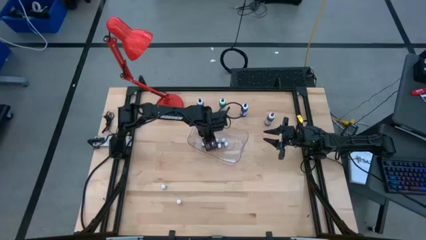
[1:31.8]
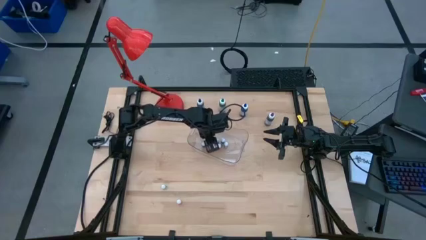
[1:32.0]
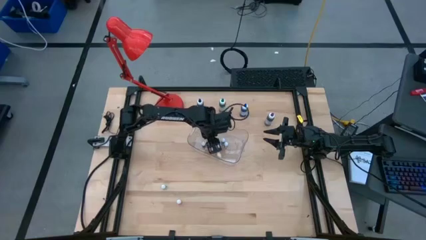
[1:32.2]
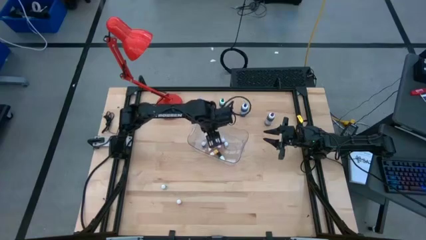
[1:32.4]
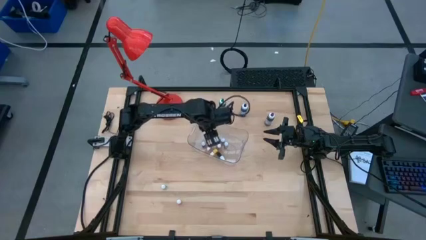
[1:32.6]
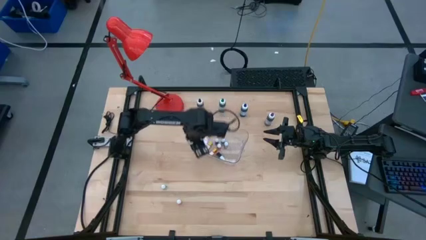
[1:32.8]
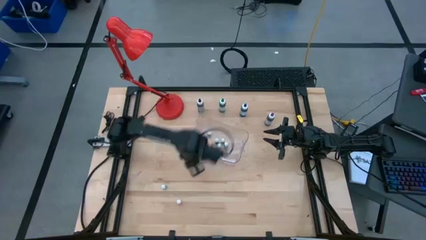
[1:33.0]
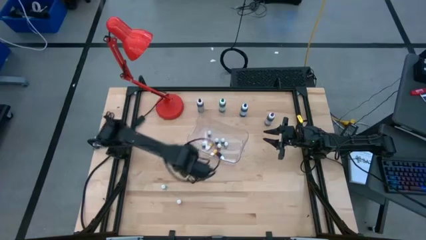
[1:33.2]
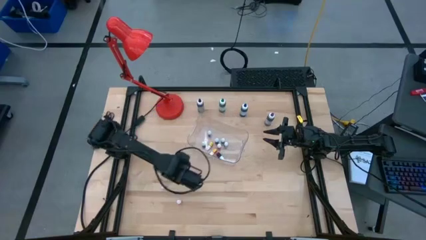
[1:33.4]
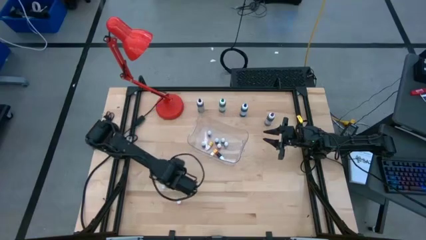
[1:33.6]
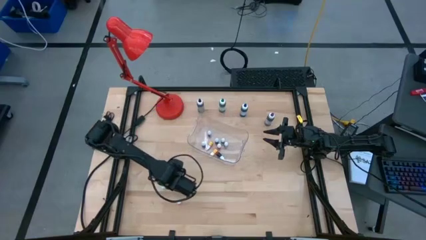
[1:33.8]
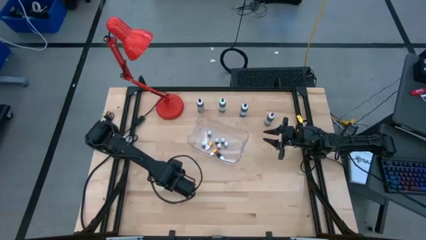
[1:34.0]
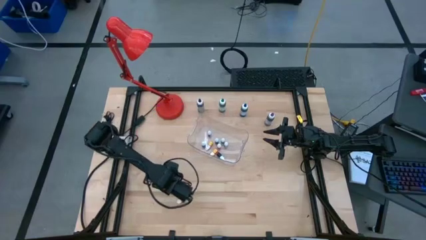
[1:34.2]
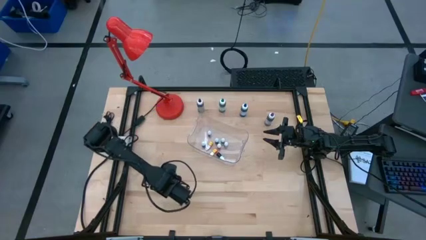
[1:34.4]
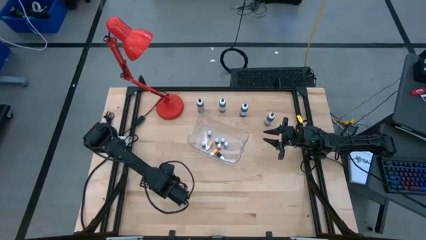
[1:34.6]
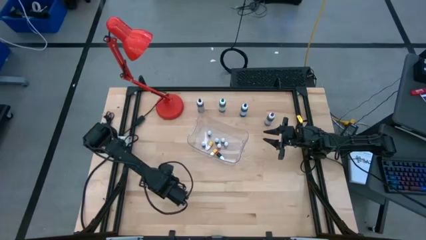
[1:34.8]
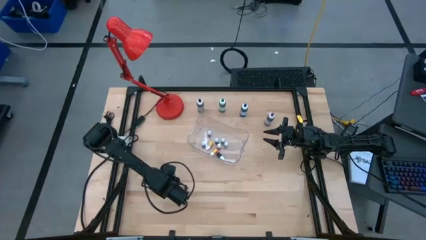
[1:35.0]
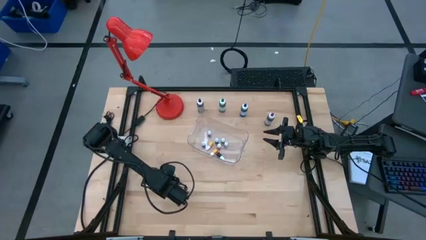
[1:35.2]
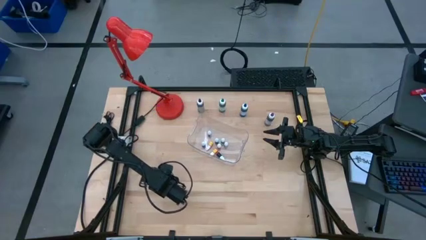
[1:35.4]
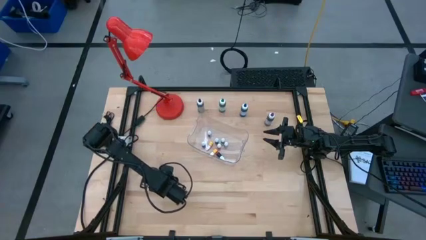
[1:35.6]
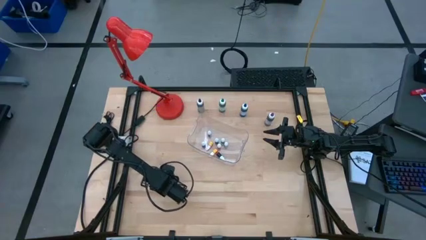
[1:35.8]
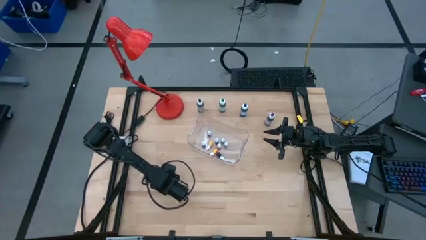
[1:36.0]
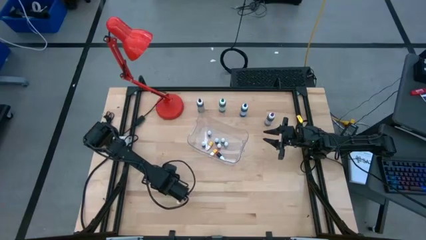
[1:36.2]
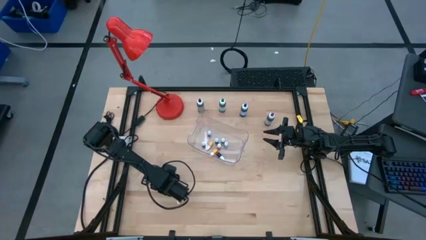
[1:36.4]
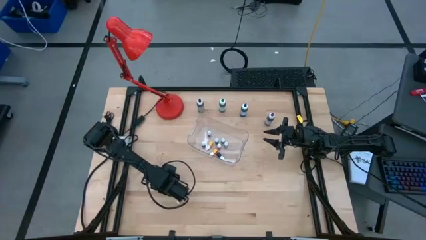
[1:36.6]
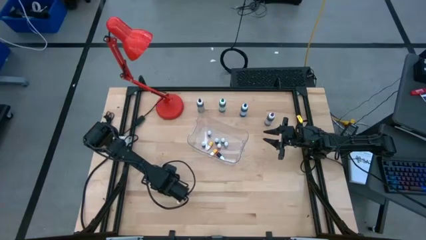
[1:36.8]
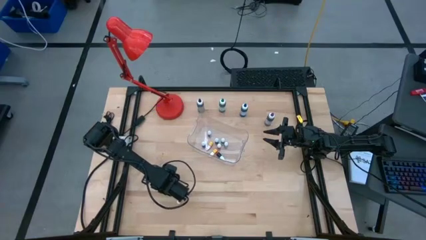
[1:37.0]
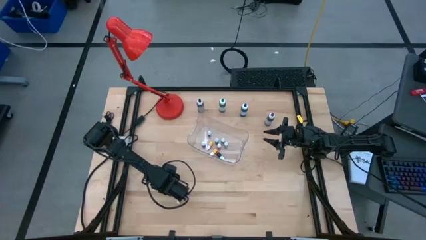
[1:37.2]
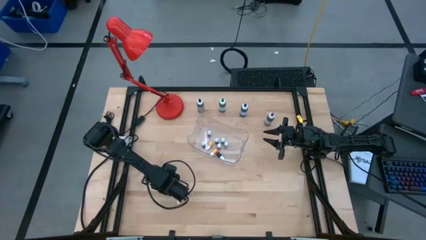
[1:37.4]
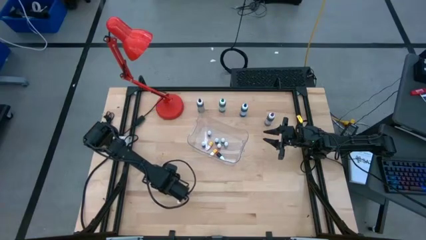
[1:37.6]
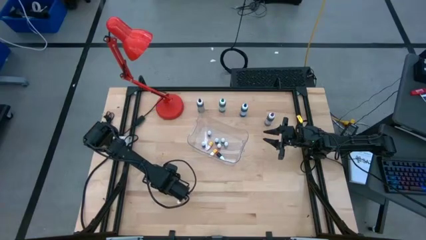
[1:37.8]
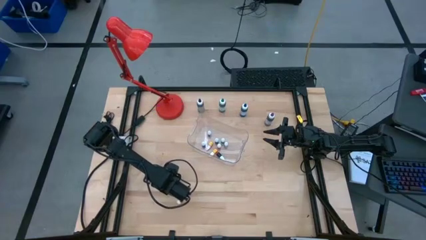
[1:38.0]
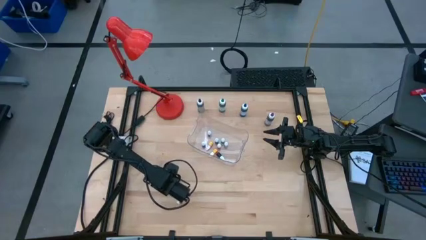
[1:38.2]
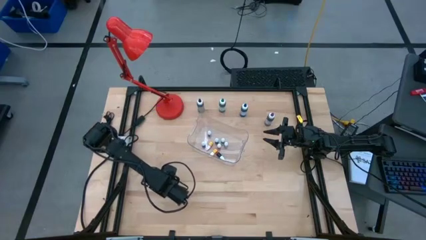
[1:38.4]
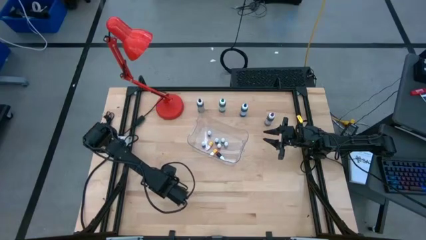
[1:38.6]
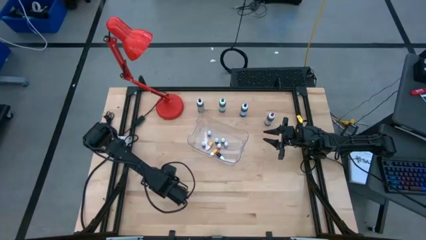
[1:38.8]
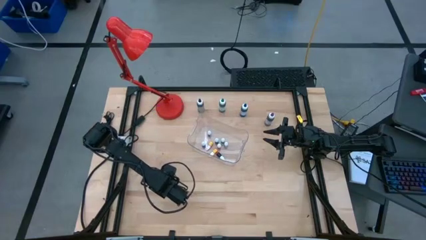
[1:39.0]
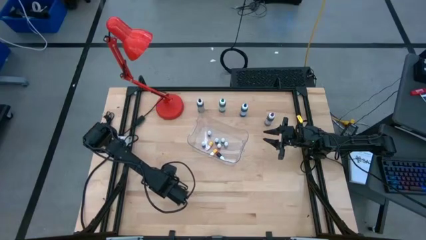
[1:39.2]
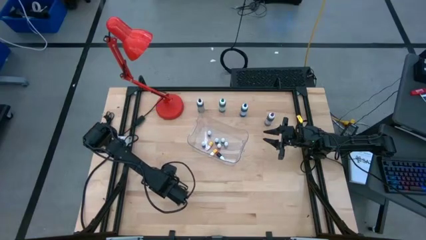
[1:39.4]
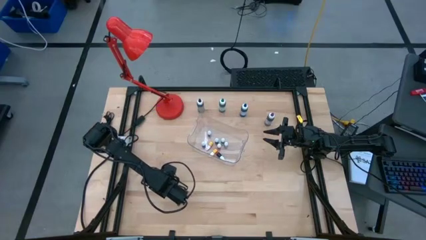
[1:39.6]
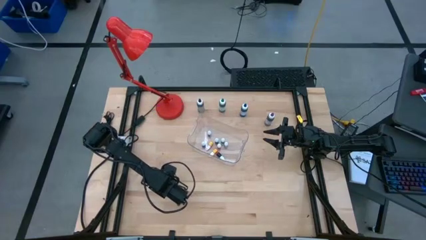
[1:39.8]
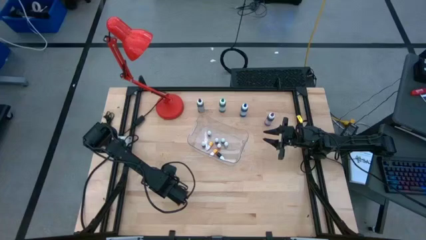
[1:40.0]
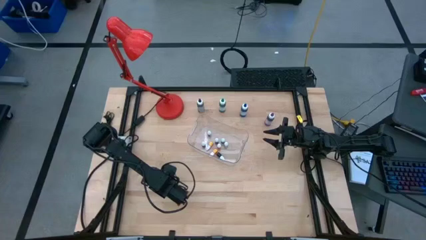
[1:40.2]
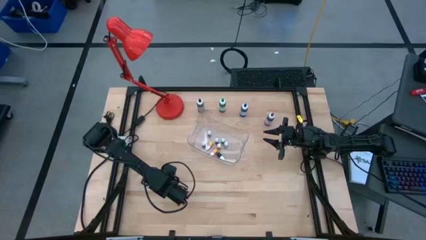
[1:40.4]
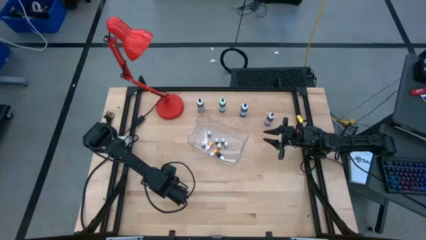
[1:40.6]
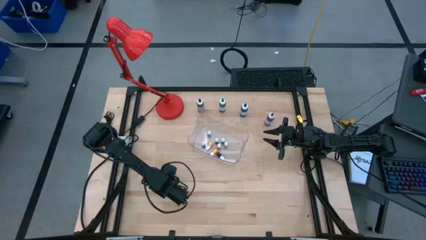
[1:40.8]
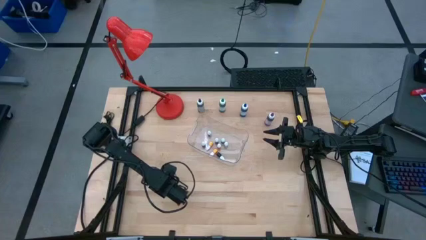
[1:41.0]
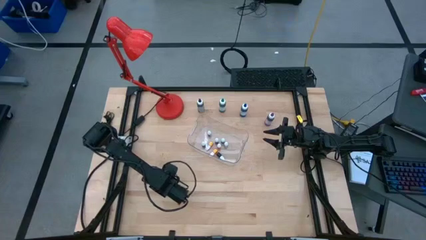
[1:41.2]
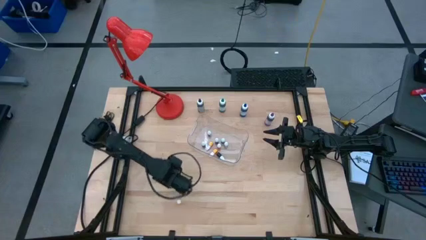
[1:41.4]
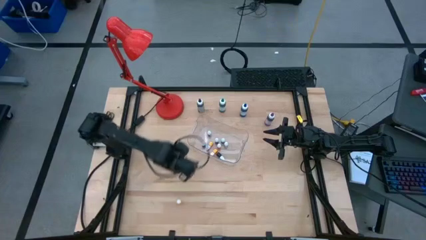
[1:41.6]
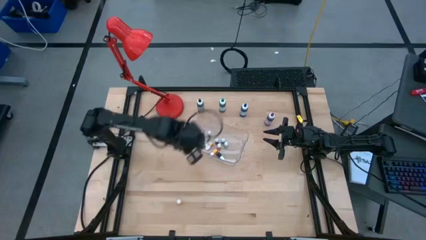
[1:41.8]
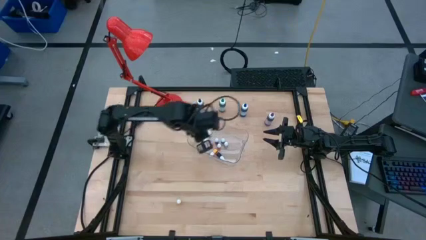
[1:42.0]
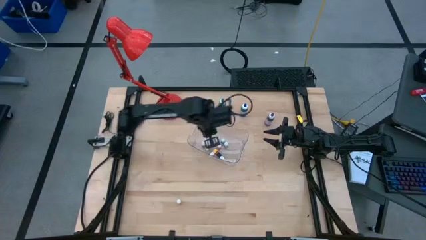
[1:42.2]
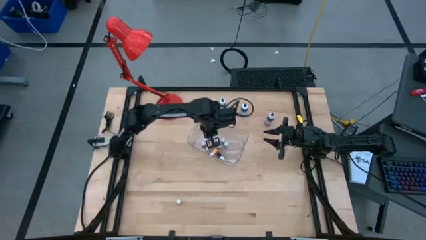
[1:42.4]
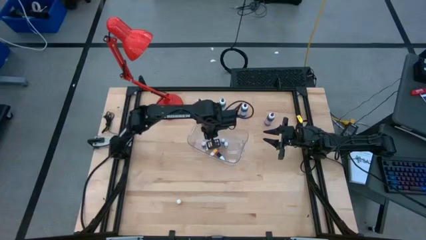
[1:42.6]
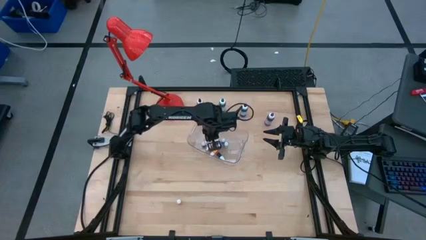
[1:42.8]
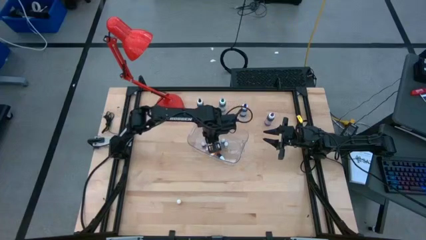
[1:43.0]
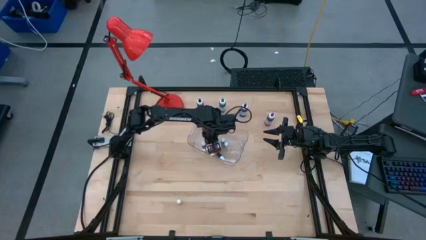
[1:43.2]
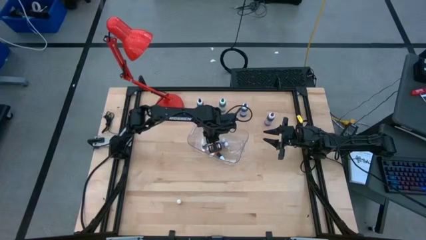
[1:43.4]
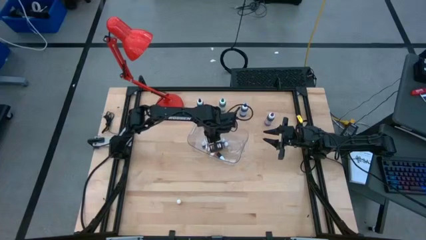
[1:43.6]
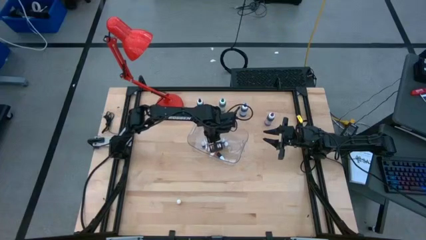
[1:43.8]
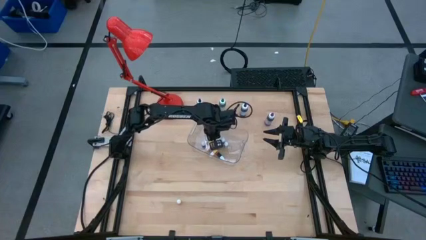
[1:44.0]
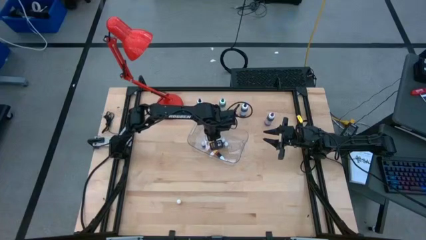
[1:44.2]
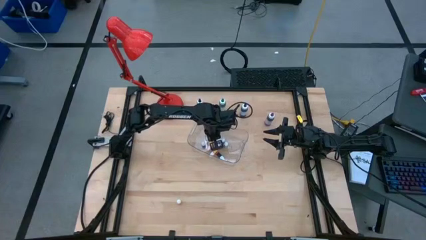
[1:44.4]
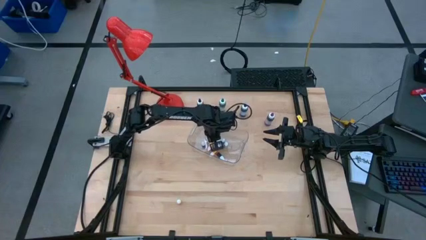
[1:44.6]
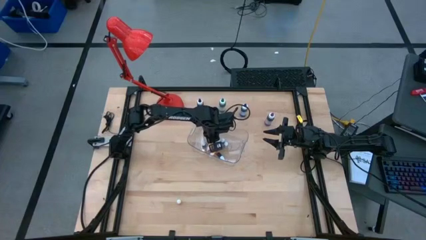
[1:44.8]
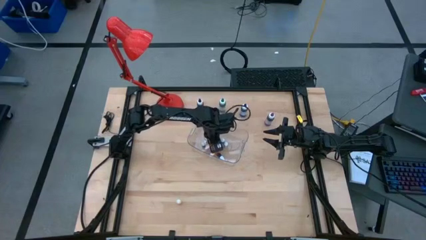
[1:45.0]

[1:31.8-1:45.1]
Task: Pick & Place food coloring
Put the small black food coloring bottle in the transparent bin

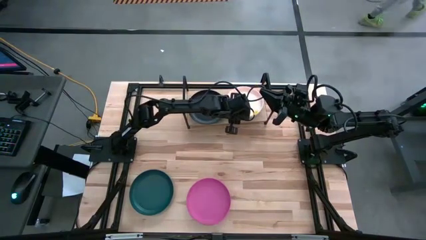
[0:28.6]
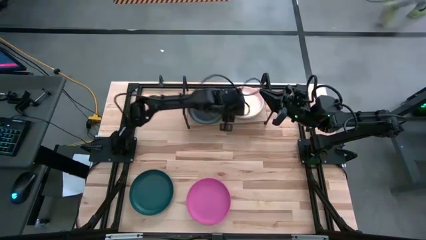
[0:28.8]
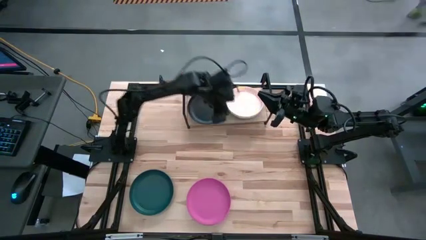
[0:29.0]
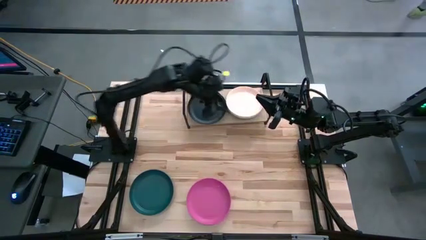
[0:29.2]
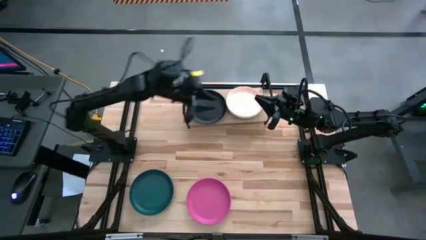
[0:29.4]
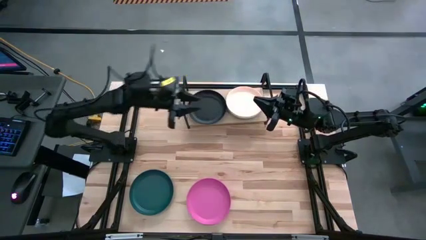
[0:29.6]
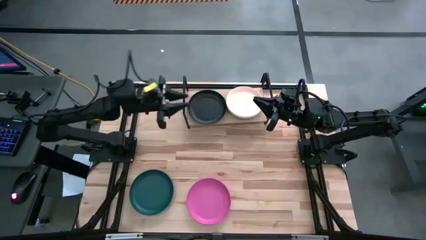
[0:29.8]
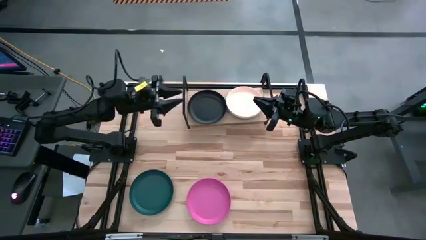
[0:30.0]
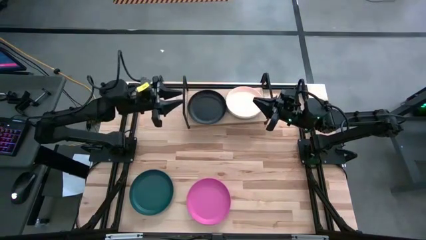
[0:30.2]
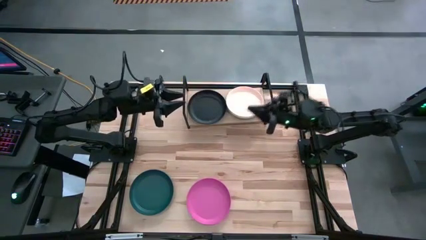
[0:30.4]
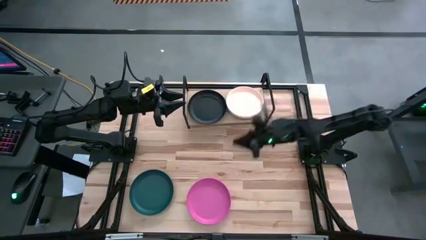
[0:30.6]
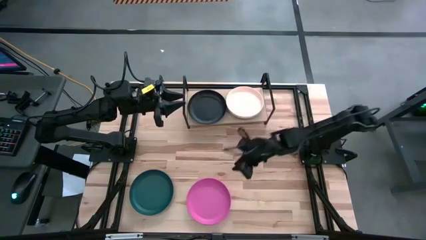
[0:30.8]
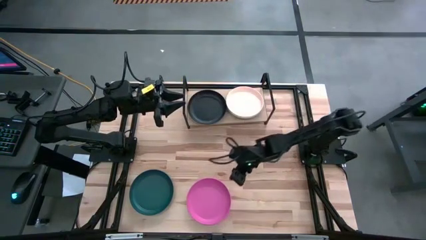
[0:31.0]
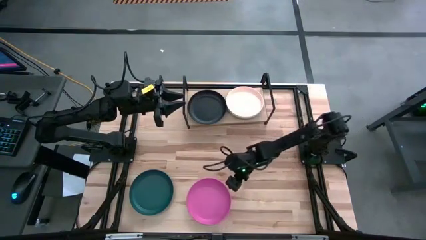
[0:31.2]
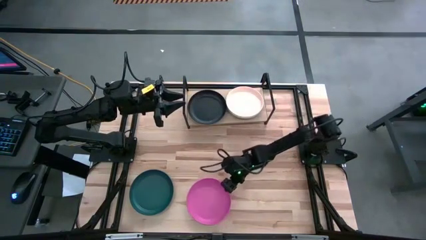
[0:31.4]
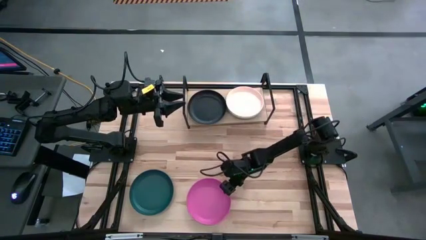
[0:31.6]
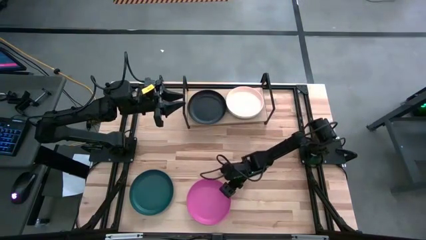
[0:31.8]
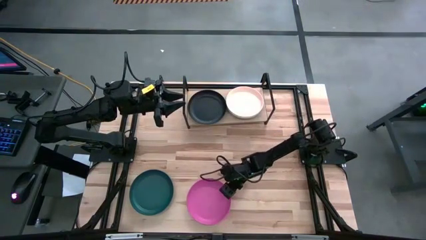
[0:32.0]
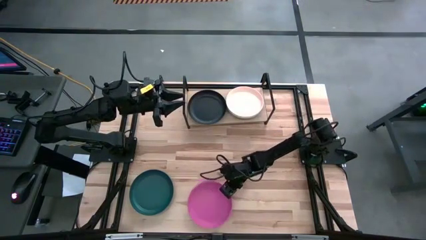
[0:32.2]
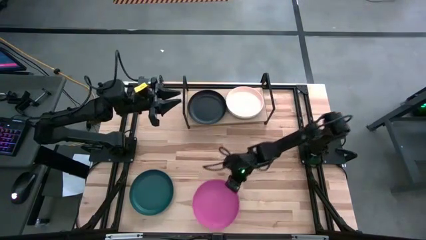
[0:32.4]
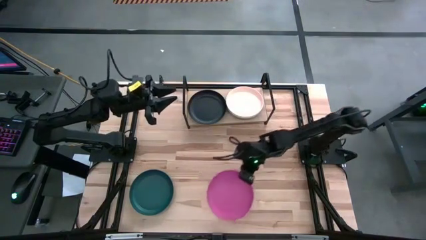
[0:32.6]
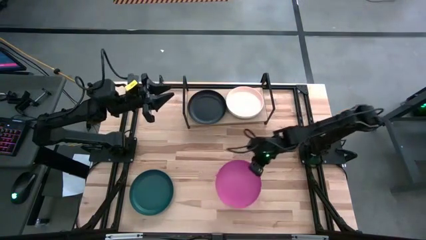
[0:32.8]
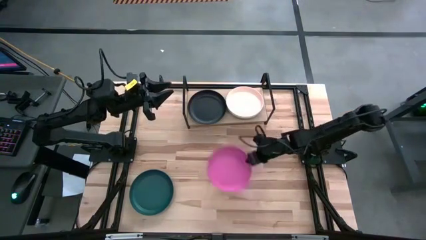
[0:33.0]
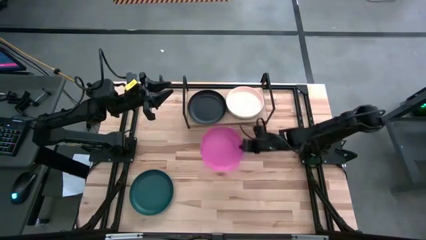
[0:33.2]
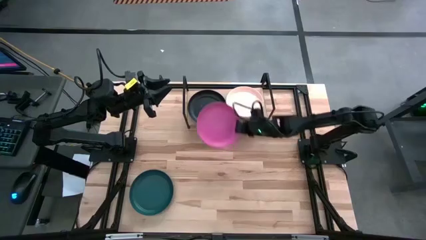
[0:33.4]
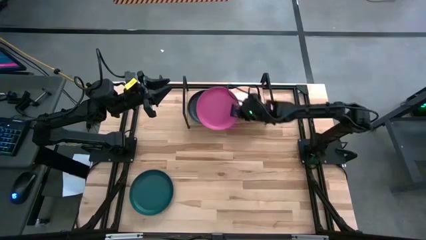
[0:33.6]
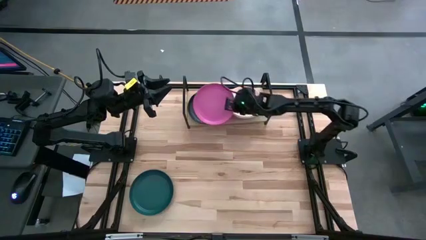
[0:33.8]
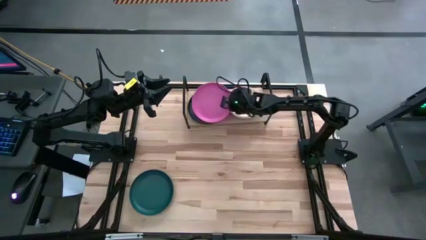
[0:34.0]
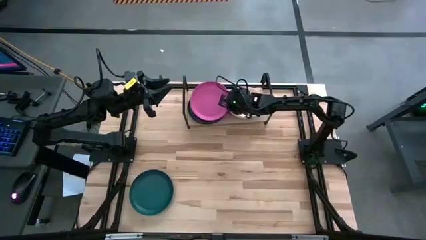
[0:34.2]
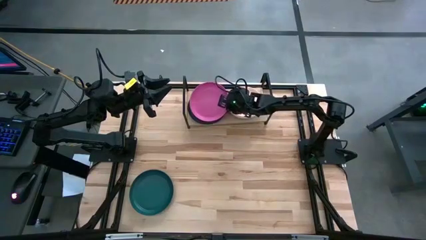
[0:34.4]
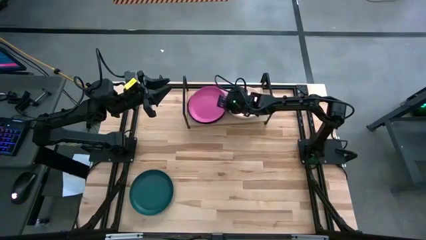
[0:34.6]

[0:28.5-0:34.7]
Task: Place and stack plates onto a shelf
Stack the pink plate on top of the black plate on the shelf
